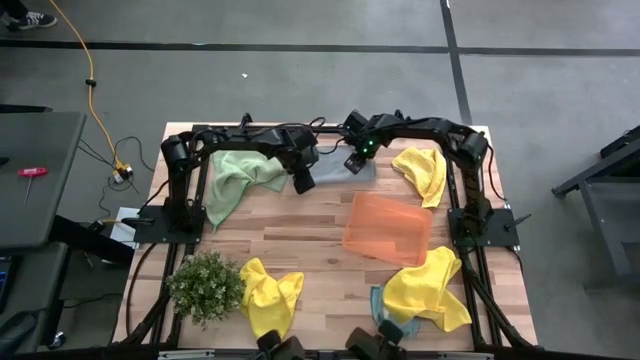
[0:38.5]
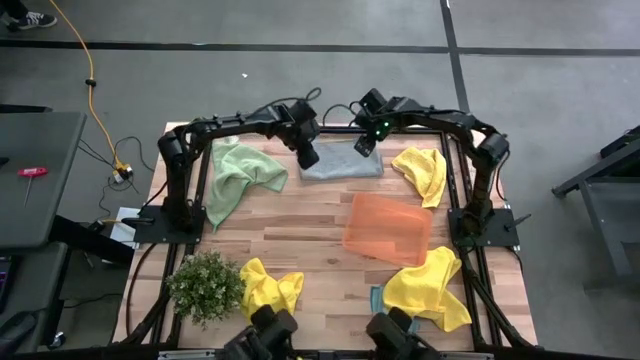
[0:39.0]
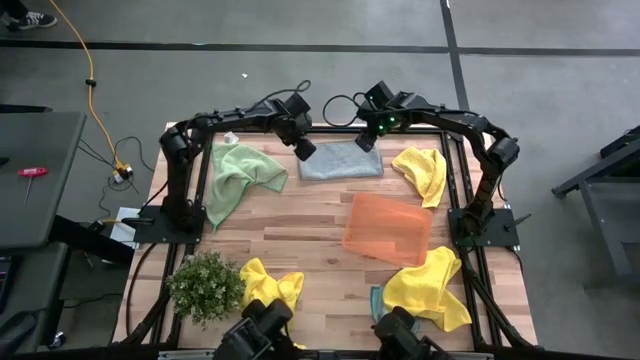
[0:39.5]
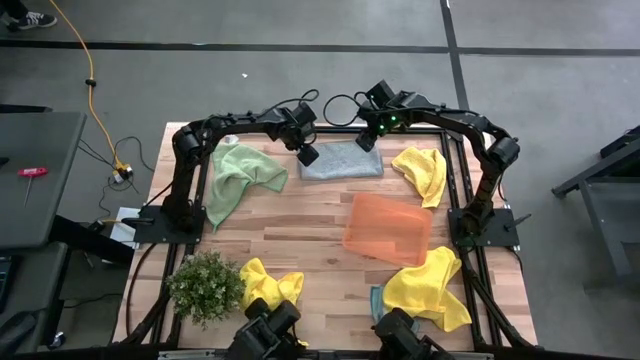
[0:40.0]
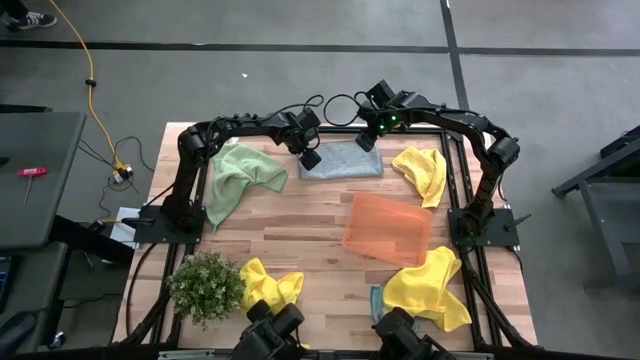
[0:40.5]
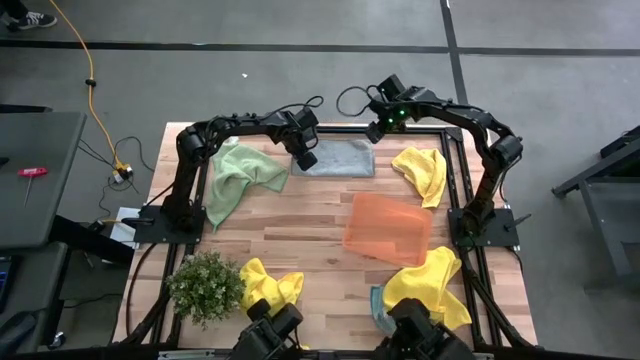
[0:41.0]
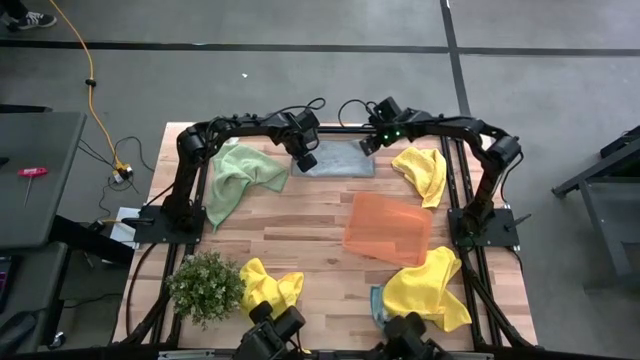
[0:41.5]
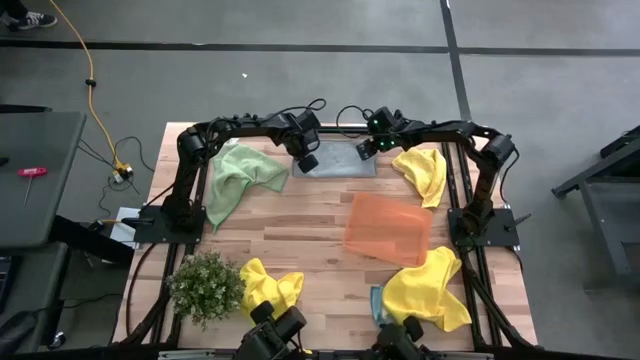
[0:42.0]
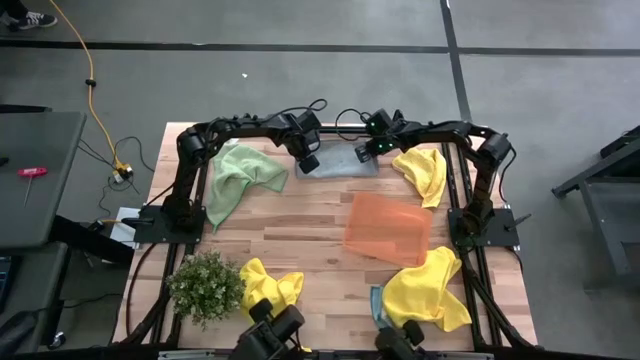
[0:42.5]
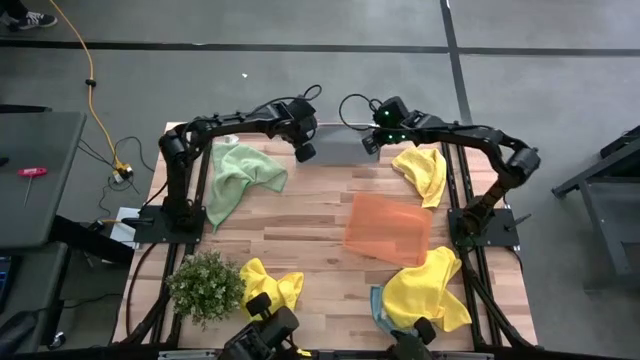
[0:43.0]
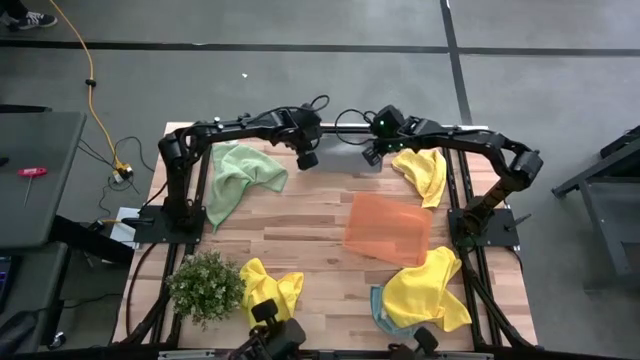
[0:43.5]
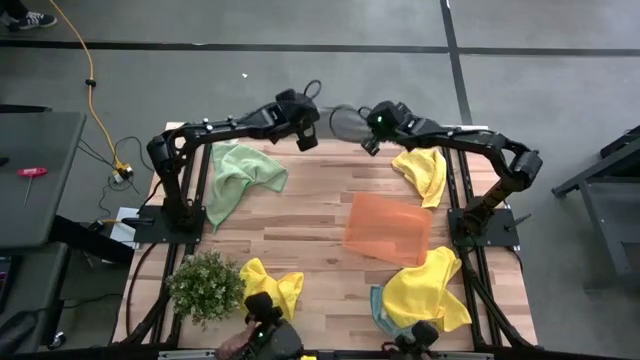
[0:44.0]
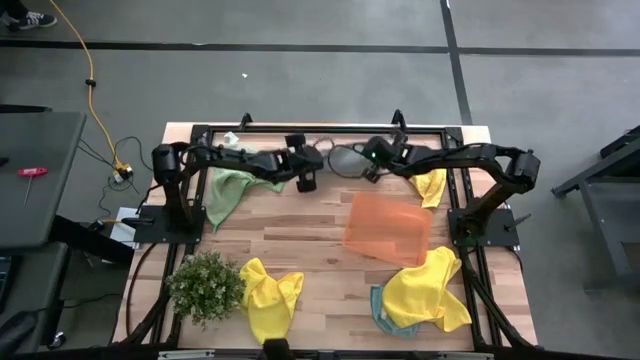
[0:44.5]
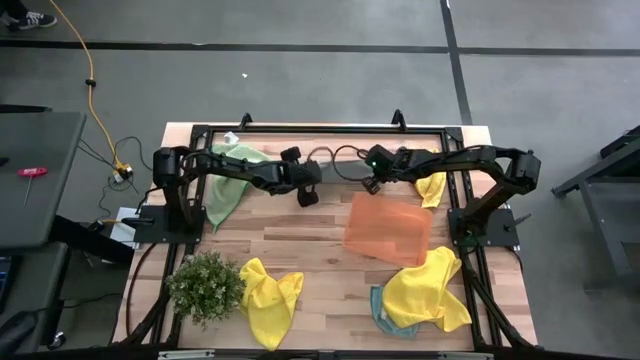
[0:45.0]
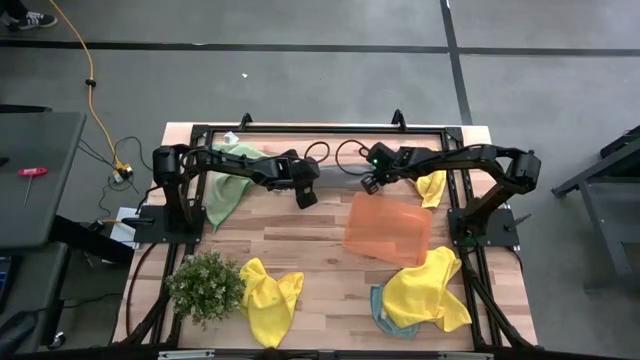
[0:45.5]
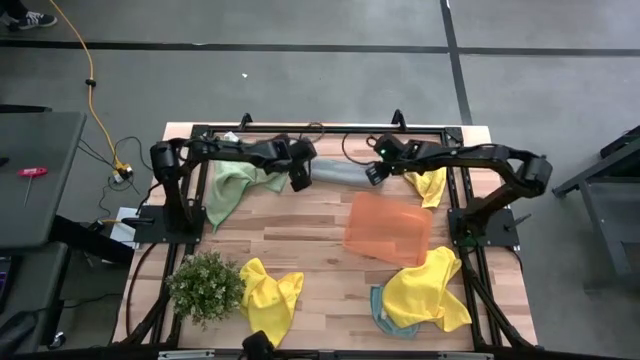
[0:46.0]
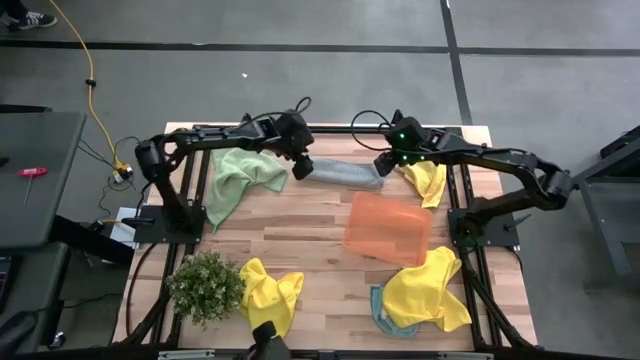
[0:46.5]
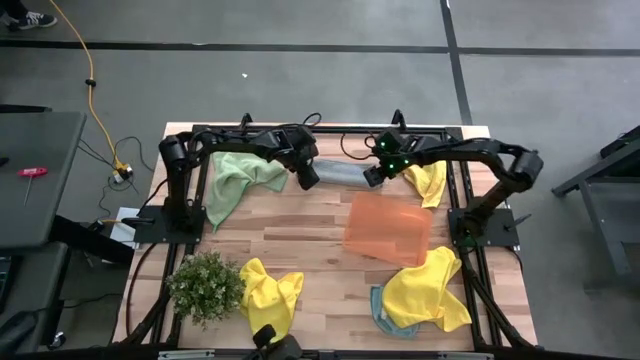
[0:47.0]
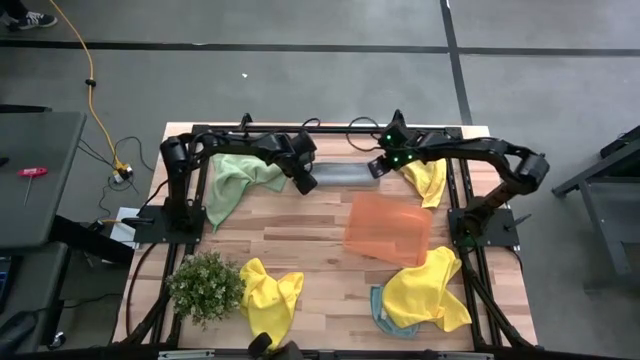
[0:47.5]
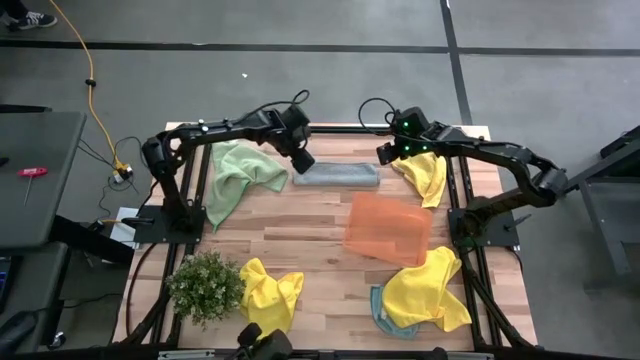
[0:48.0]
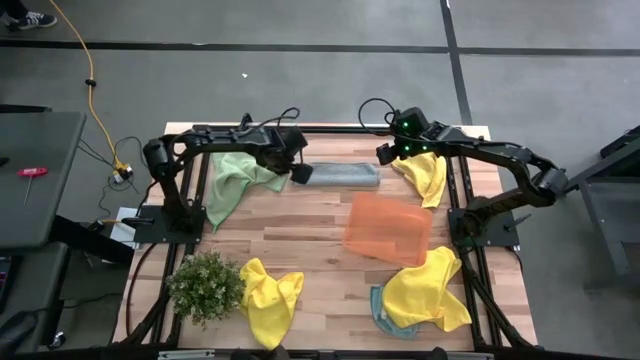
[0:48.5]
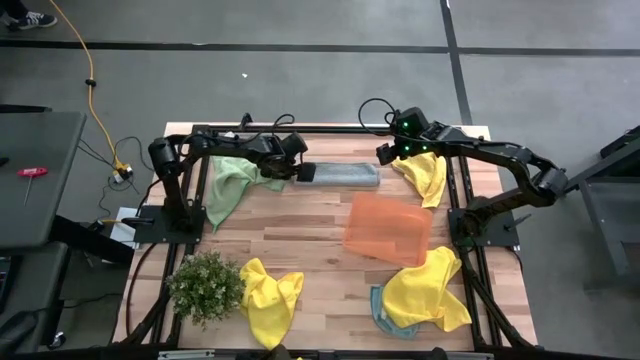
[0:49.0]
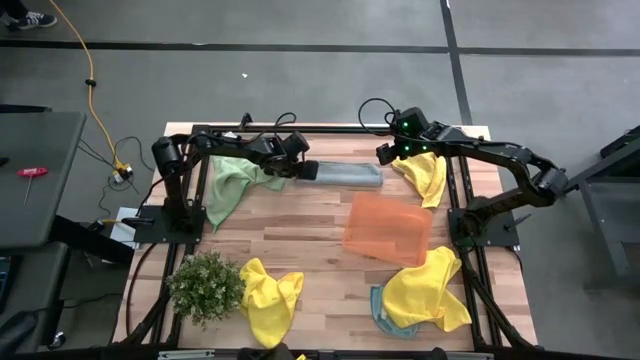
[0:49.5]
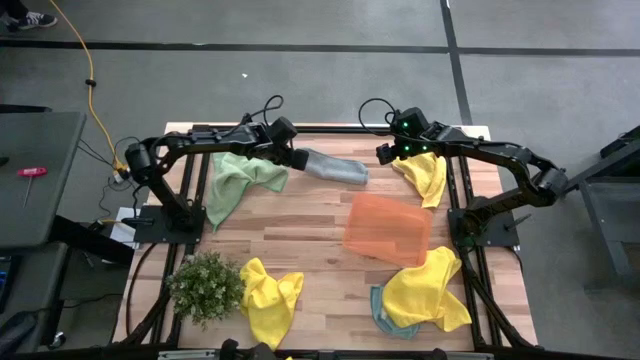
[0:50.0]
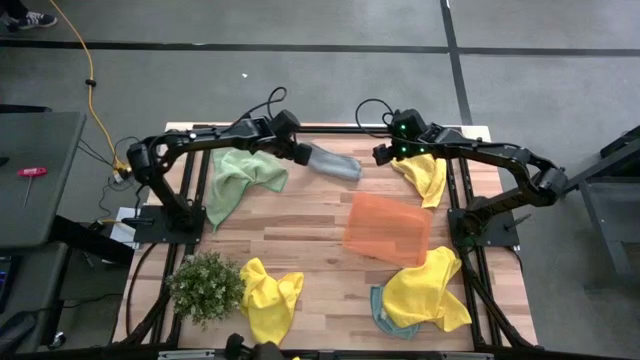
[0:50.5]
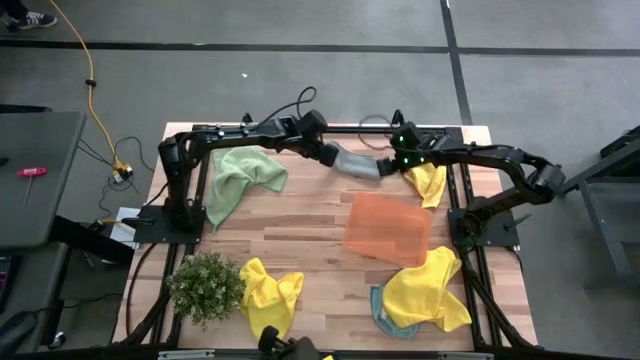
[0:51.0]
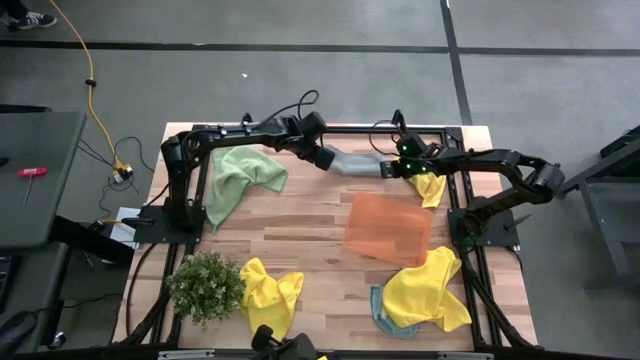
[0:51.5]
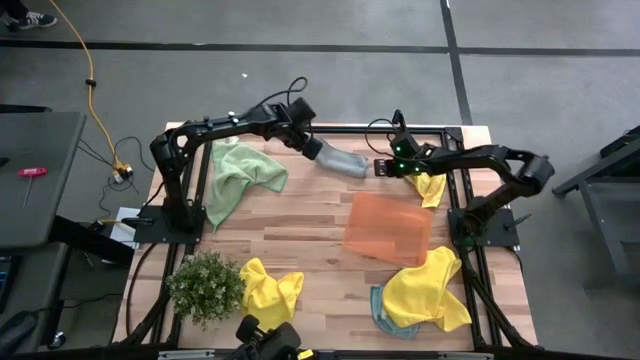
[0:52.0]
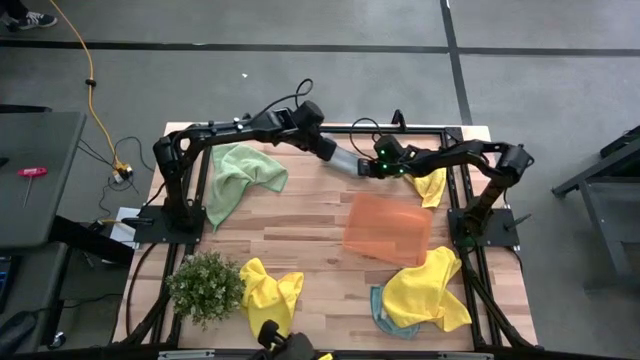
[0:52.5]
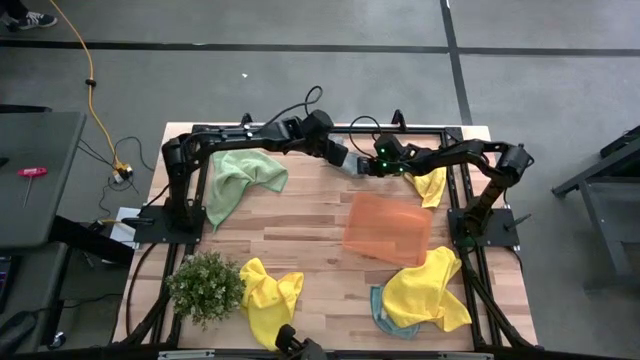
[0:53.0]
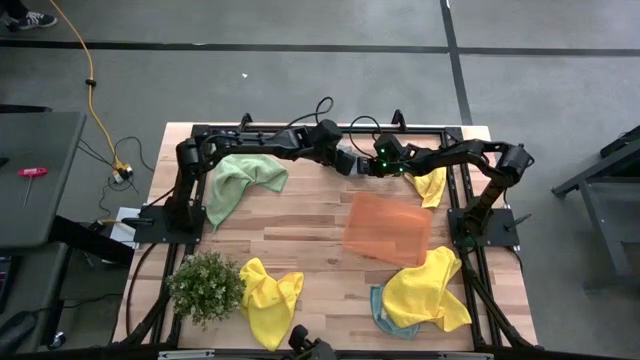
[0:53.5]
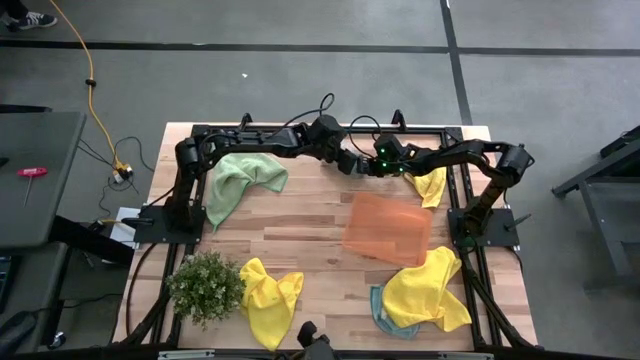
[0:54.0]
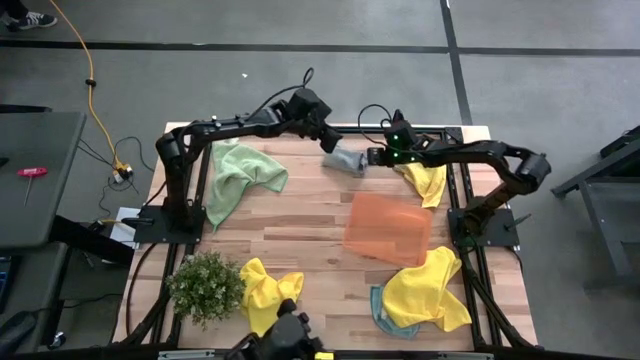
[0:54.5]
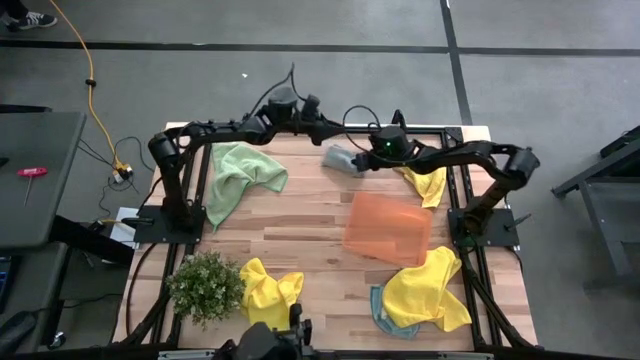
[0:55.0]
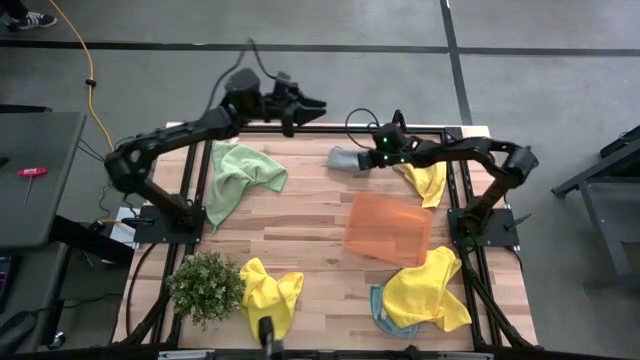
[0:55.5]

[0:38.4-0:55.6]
Task: Fold microfiber towels
Fold the gray microfiber towel

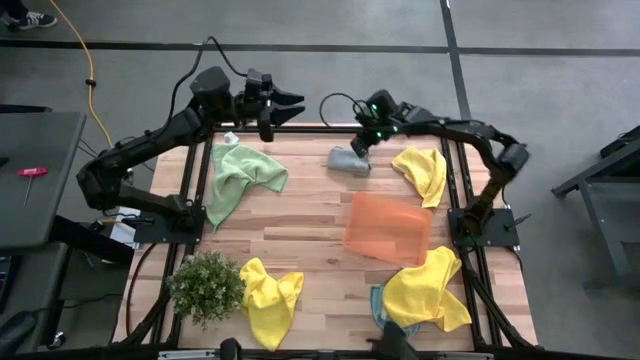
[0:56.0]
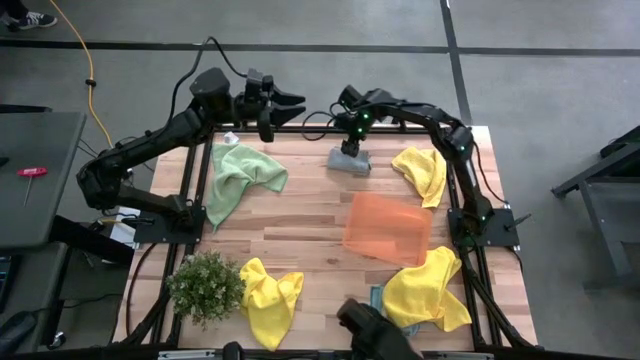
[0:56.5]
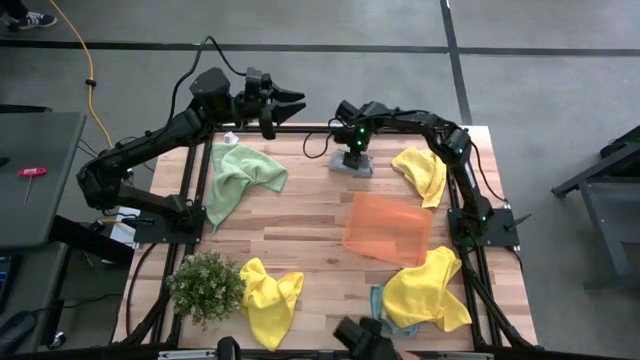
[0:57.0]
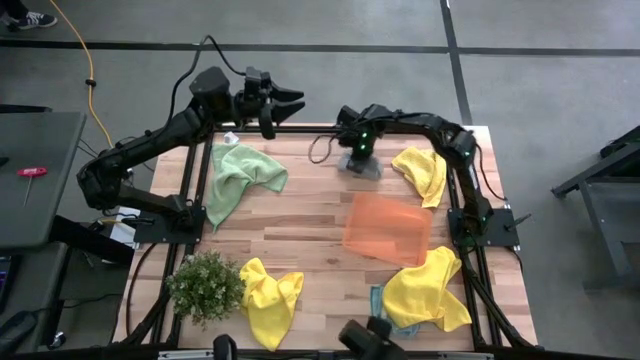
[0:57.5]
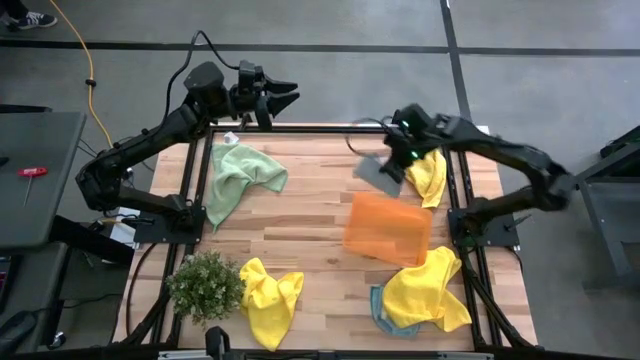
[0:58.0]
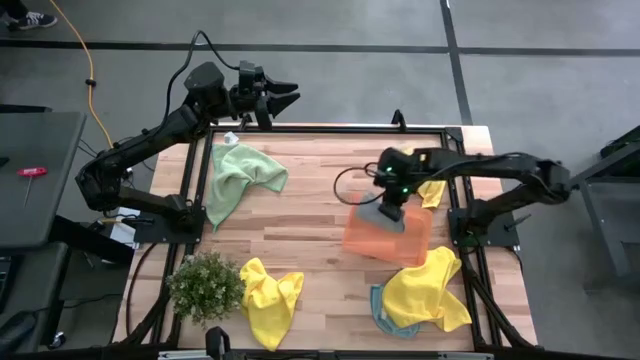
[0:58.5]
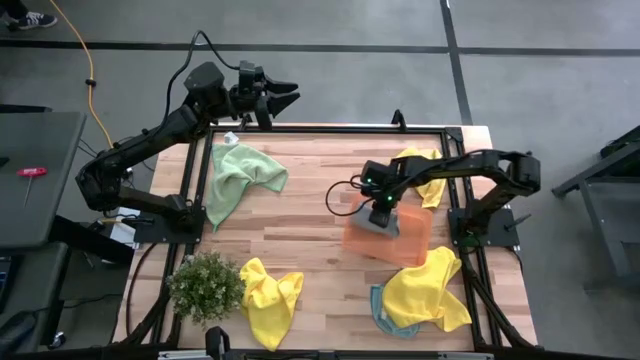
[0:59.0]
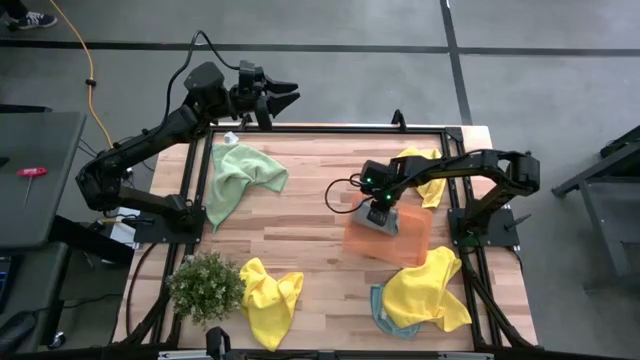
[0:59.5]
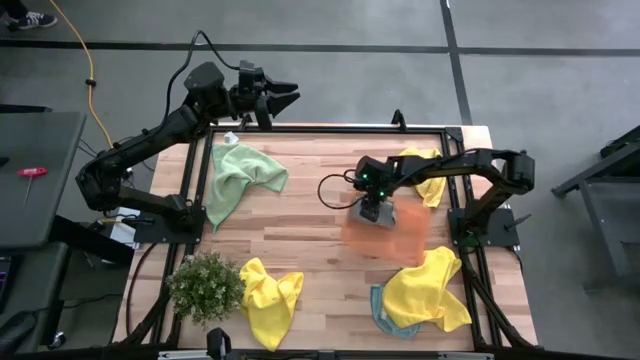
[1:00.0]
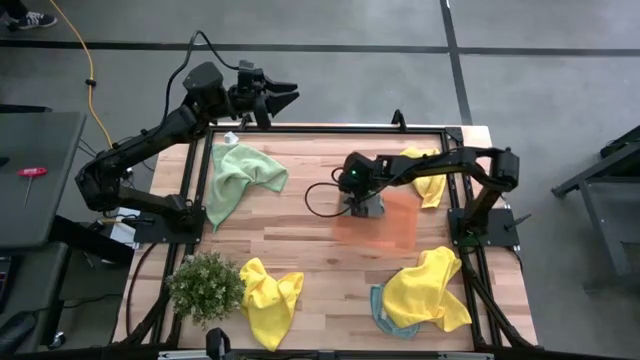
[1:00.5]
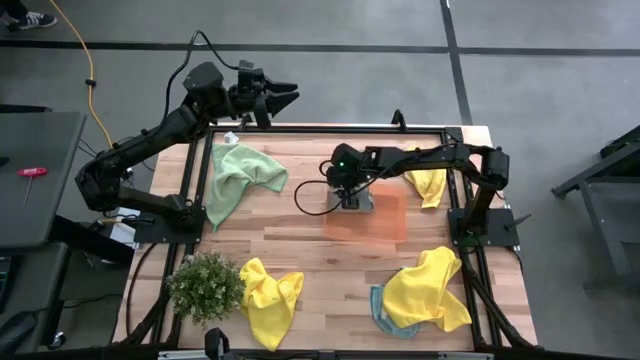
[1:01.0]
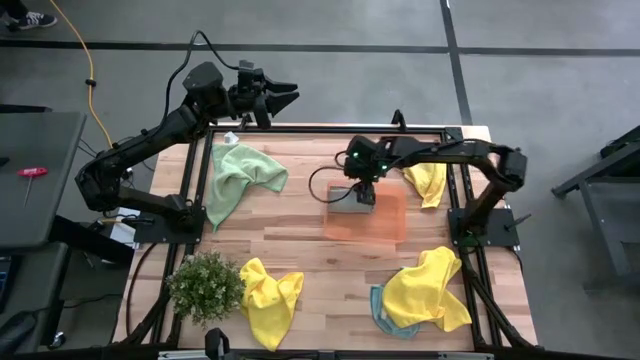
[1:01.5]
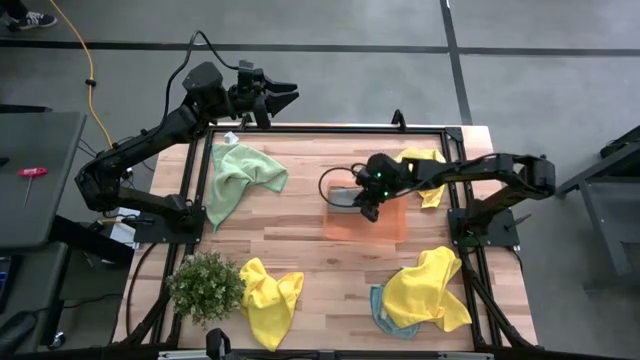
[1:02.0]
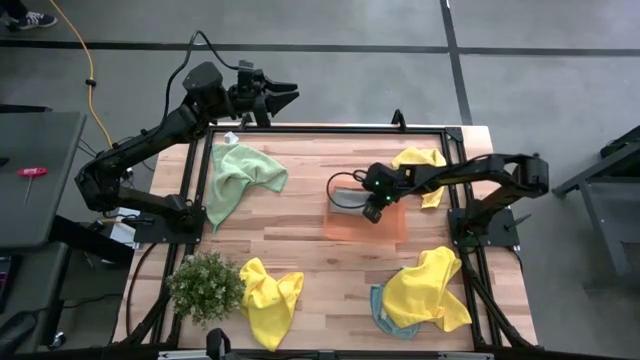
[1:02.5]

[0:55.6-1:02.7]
Put the gray microfiber towel into the orange bin
